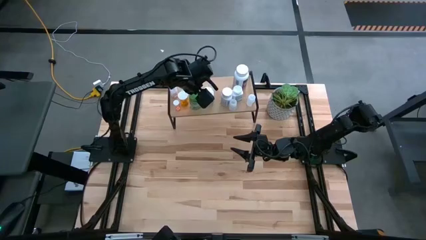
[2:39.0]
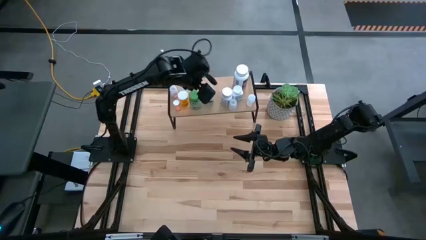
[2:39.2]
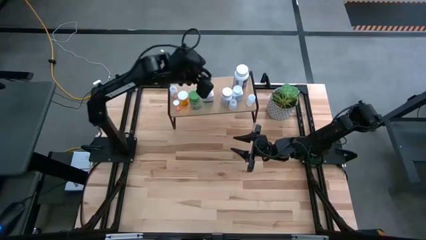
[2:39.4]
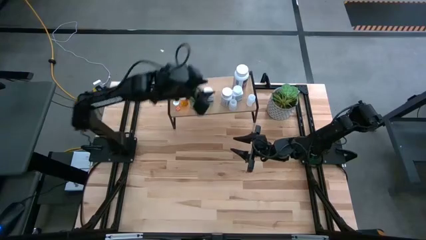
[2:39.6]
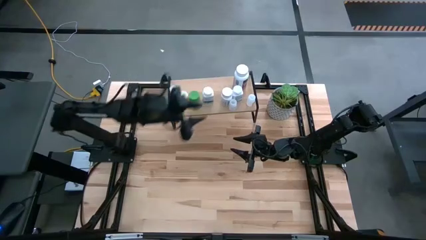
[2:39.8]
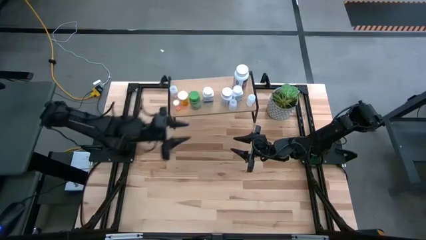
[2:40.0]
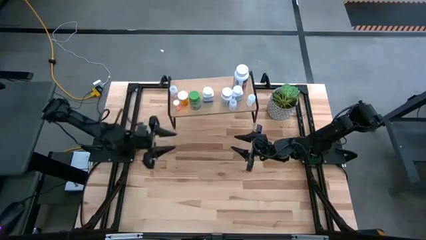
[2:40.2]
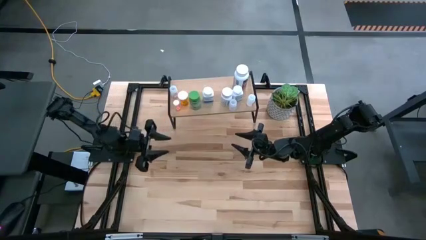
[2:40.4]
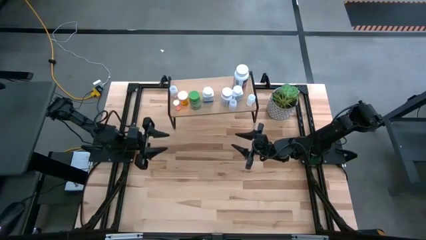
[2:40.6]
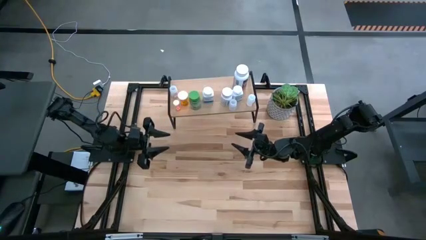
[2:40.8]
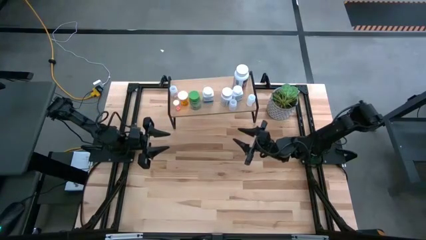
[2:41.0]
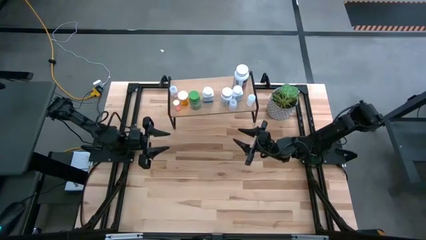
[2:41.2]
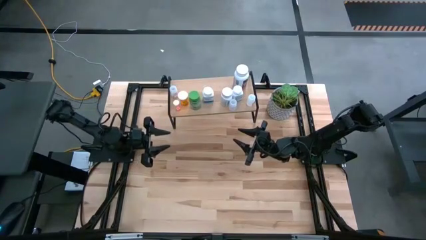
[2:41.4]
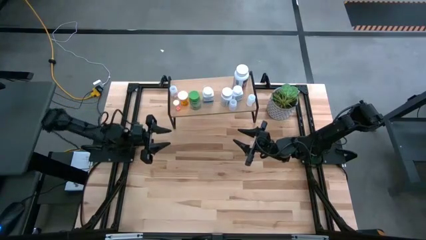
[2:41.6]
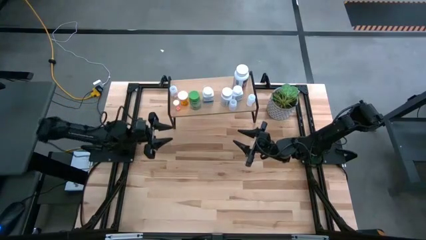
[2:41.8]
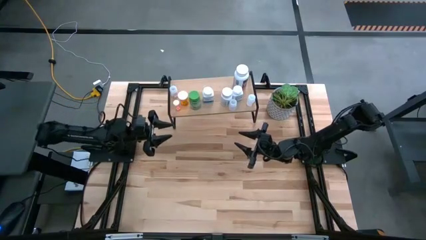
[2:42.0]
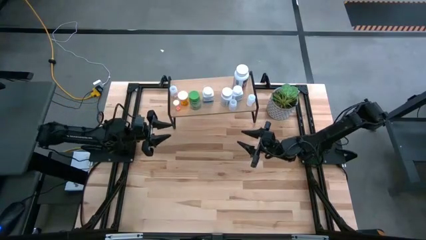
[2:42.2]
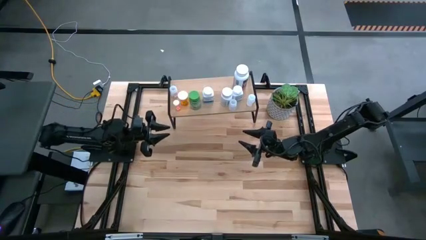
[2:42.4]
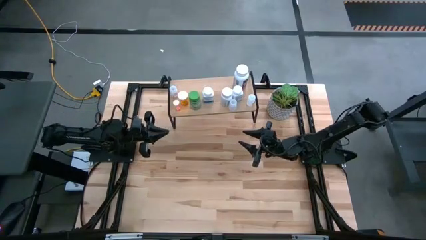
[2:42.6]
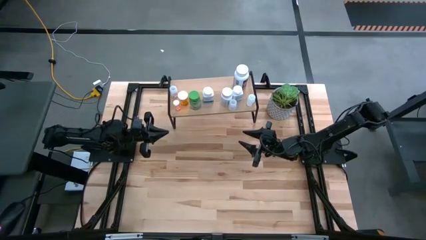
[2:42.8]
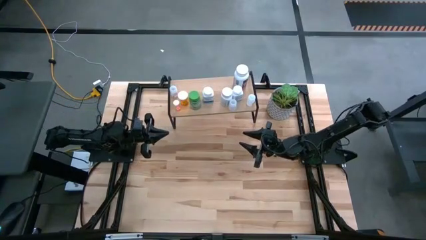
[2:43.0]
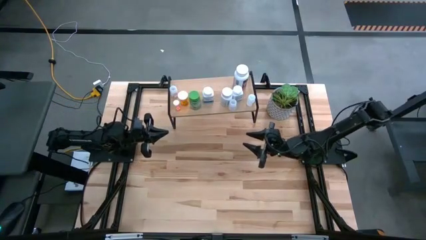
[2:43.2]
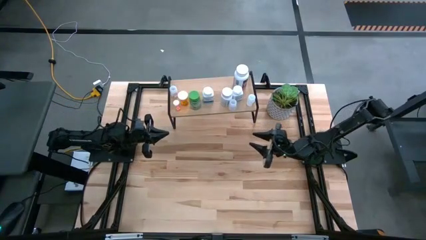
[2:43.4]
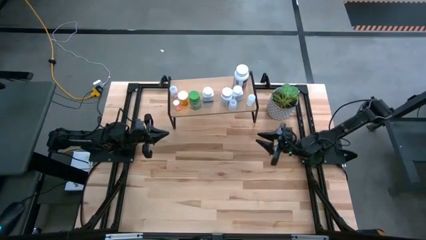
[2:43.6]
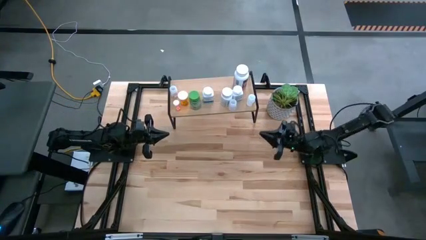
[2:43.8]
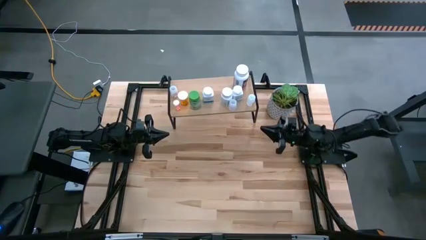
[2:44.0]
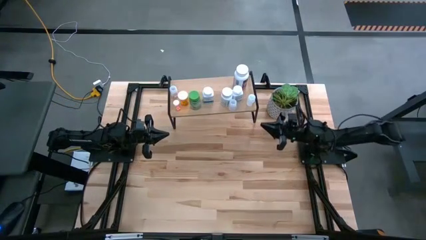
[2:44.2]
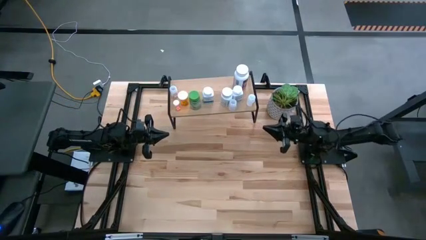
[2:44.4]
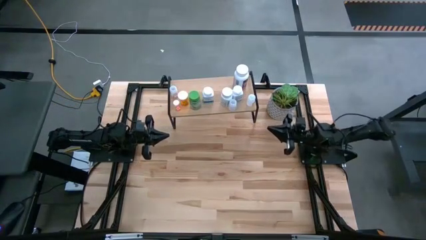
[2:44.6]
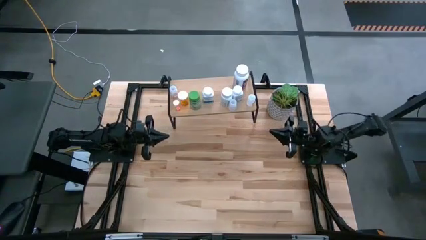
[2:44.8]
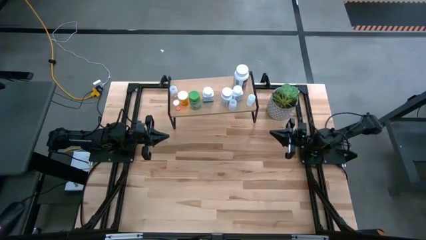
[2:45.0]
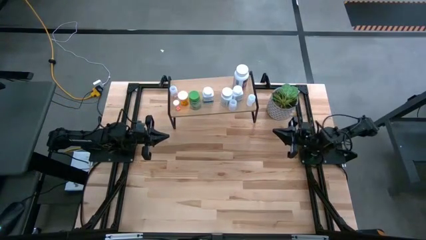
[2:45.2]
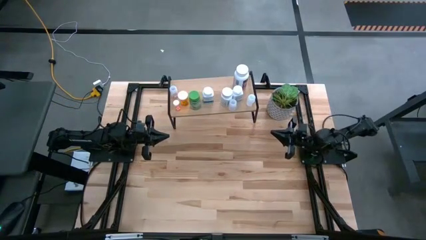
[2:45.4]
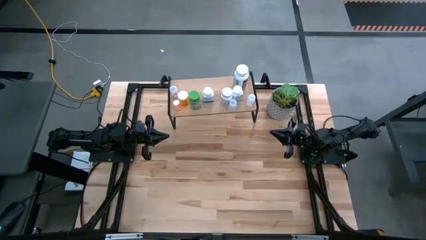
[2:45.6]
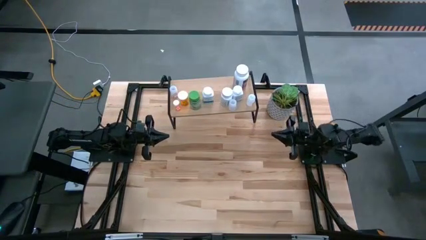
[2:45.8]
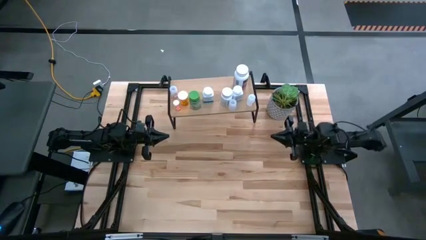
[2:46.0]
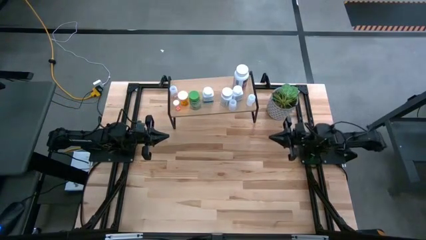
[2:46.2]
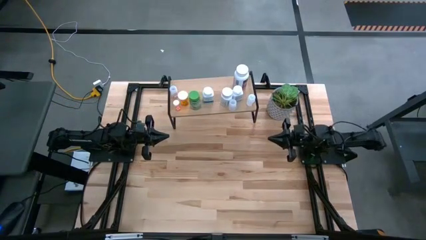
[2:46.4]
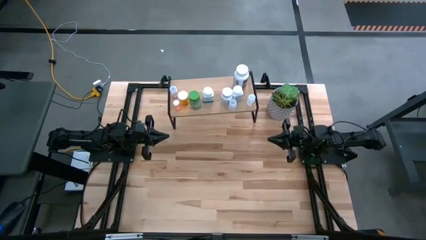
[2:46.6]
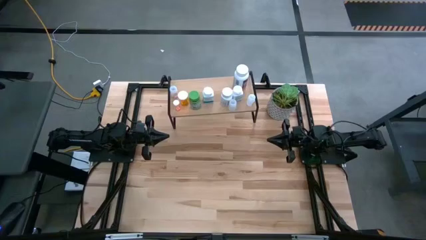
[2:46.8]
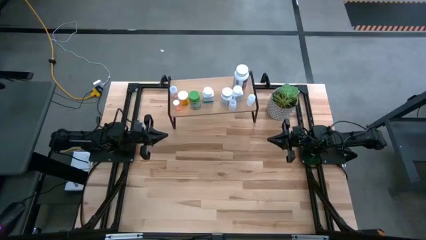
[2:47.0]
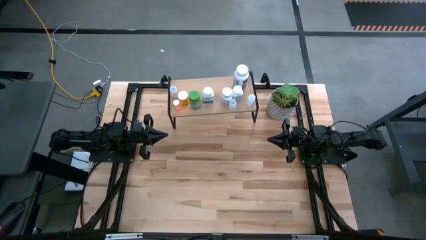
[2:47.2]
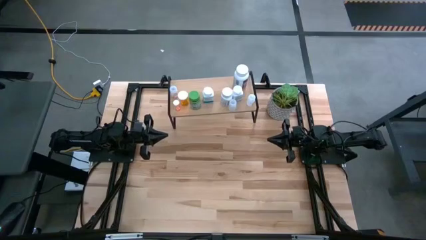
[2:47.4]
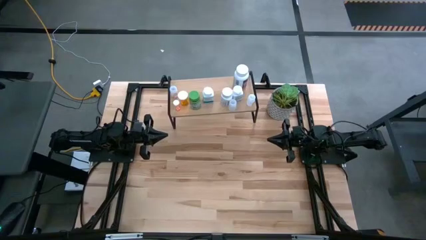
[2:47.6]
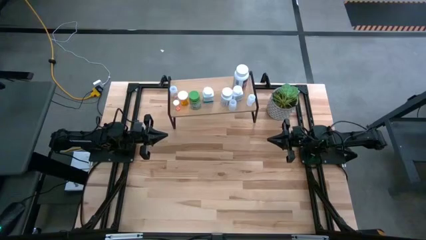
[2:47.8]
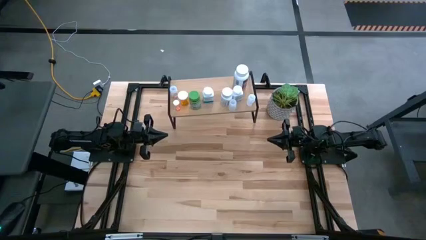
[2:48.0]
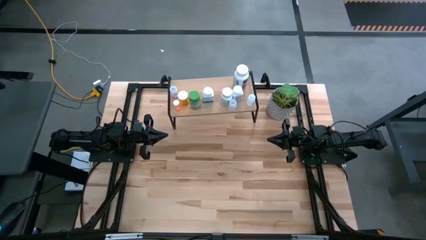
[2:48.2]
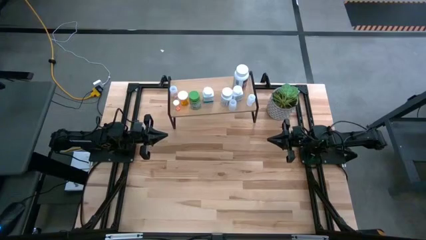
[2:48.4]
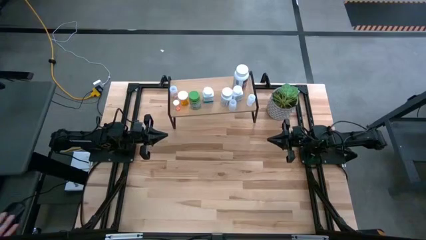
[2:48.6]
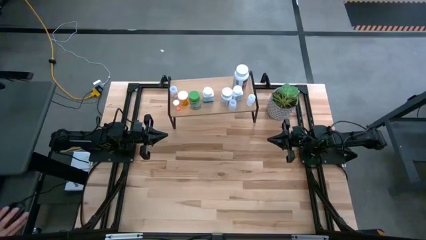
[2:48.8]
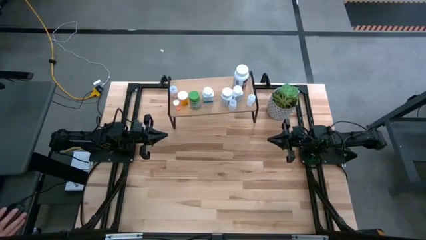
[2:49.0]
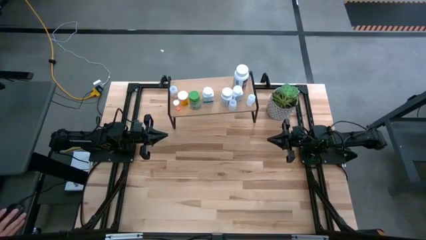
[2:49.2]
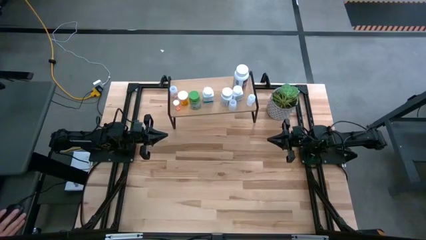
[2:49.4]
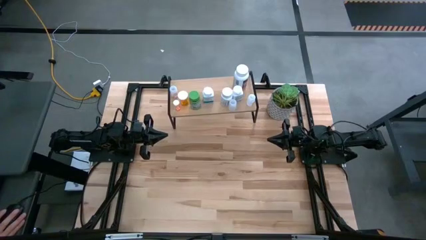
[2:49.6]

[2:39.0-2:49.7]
Task: Pick and place medicine bottles onto shelf by color
Return to Home Position
